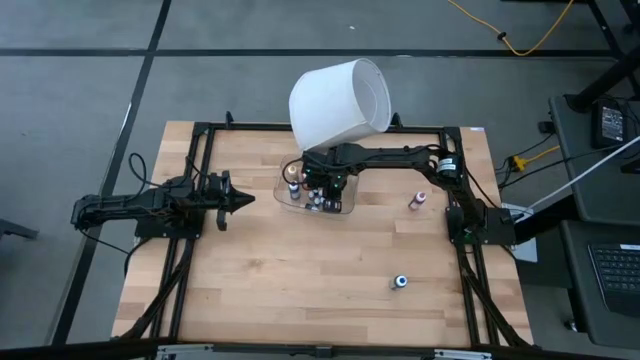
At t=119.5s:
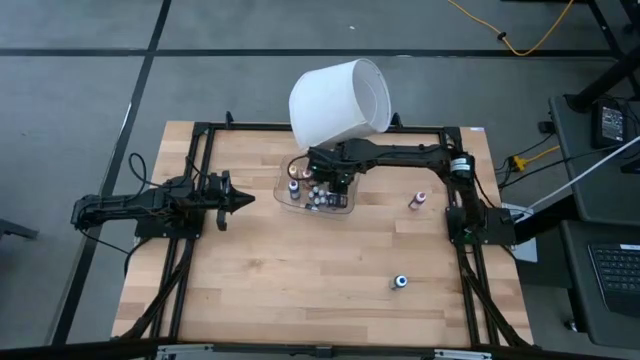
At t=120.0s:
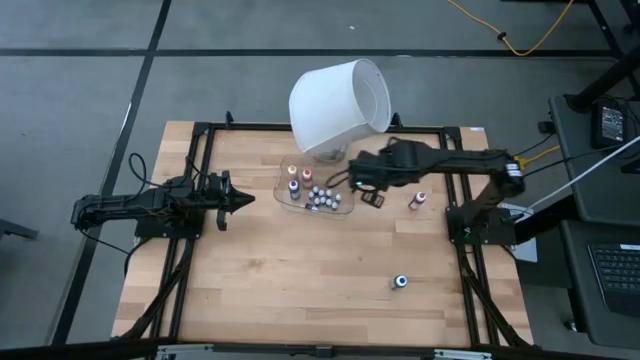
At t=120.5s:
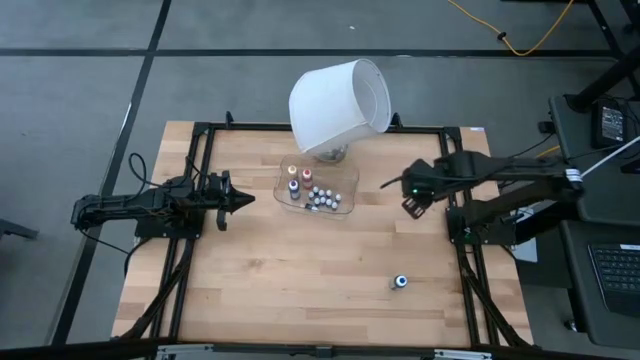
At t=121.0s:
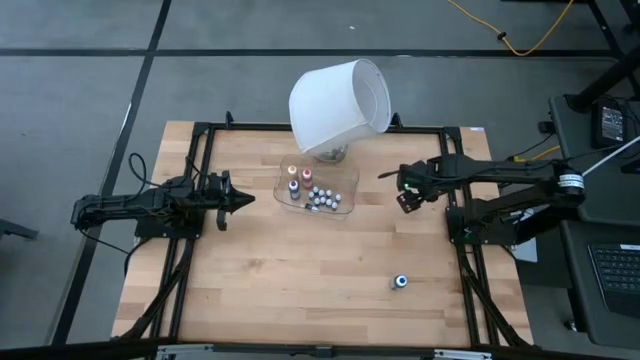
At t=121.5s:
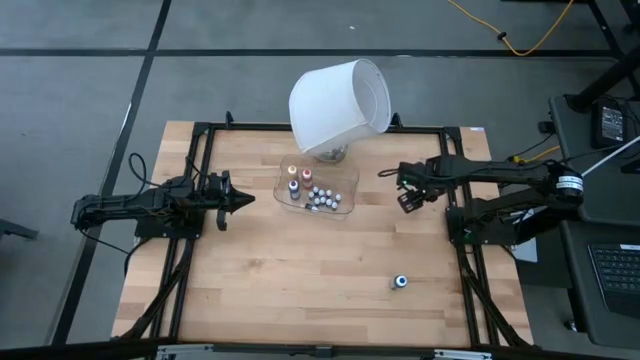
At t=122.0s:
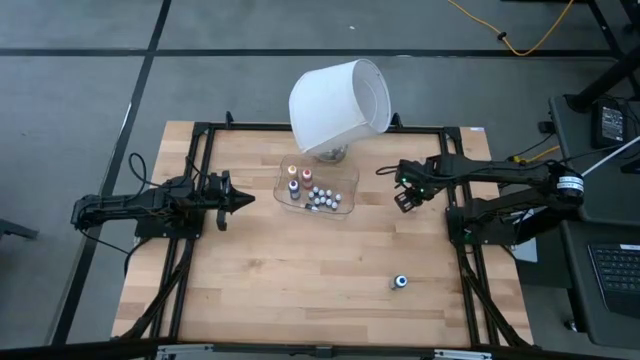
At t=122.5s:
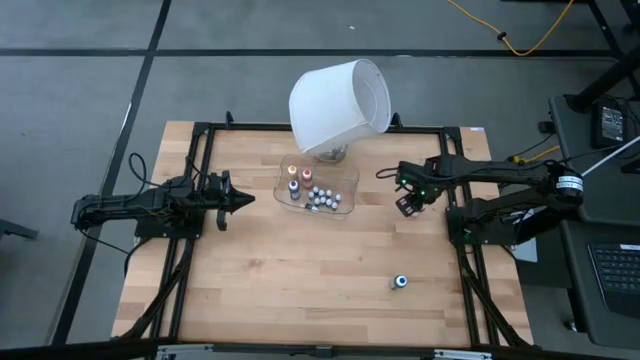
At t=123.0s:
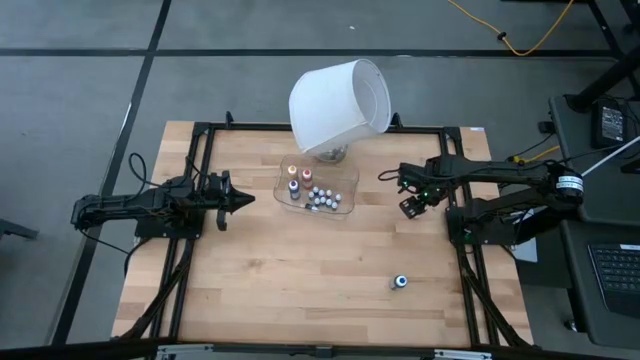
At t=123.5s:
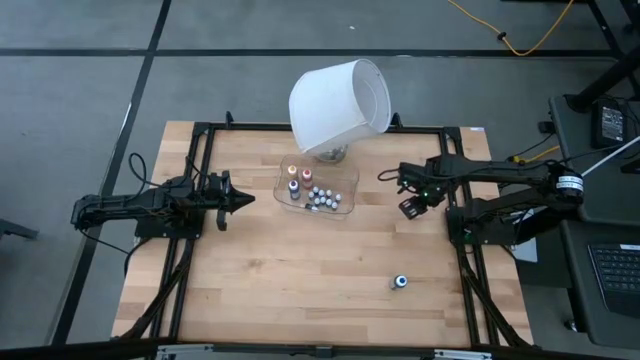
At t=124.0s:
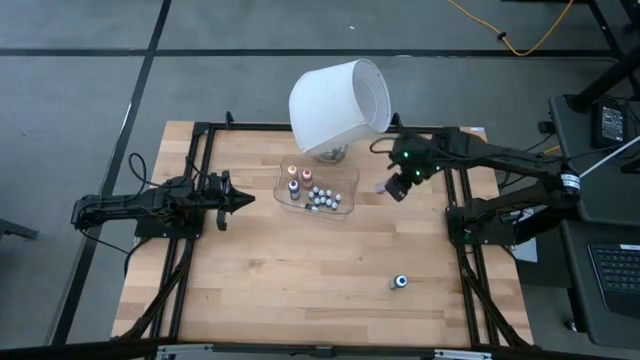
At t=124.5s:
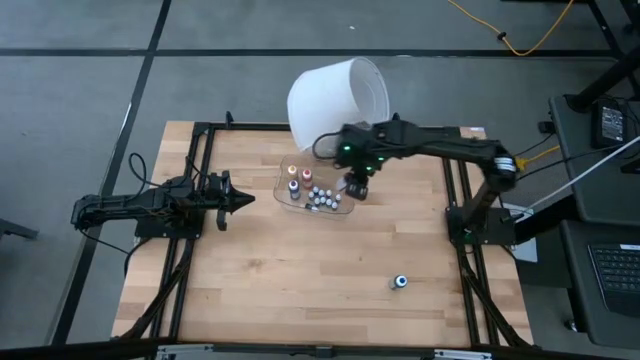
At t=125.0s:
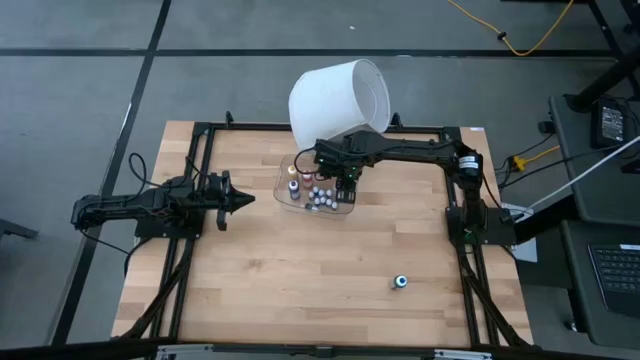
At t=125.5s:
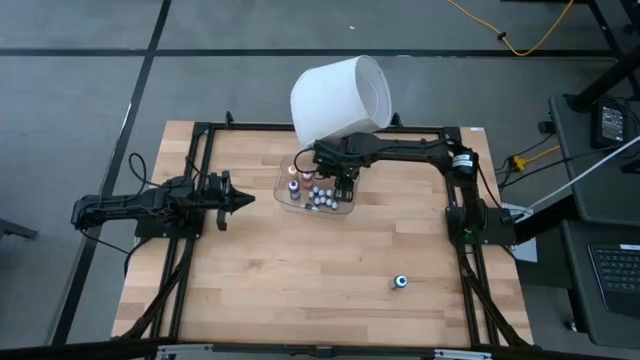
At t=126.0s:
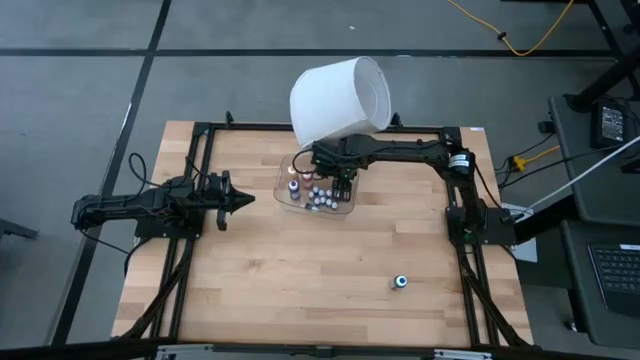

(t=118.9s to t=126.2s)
Task: Pick & Place food coloring
Put the big pink food coloring bottle into the container

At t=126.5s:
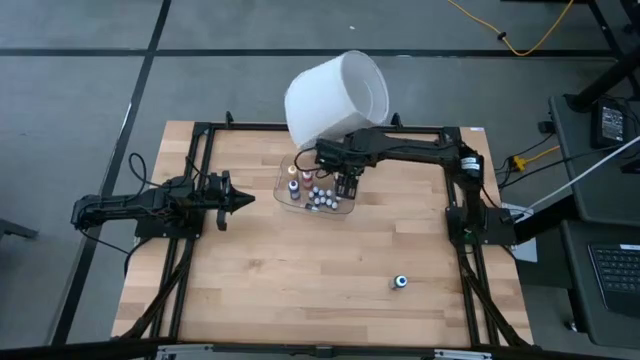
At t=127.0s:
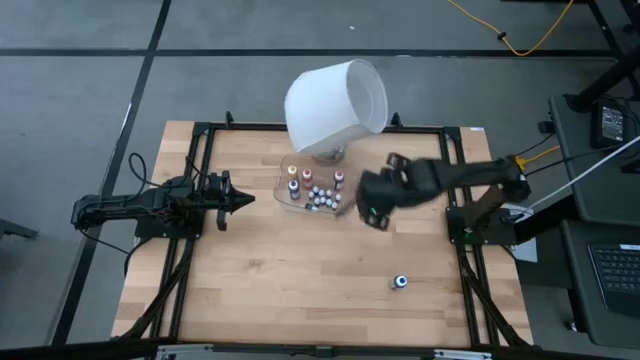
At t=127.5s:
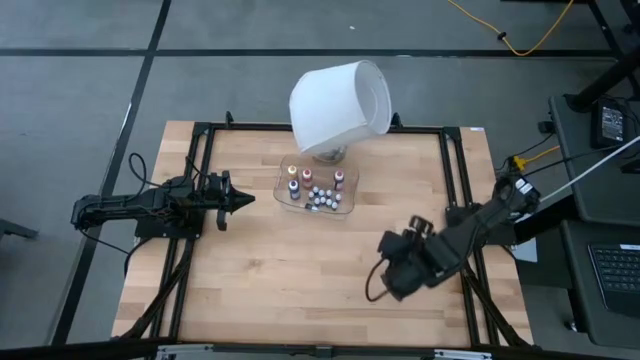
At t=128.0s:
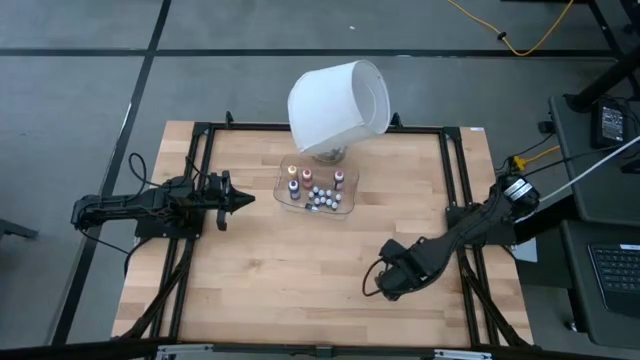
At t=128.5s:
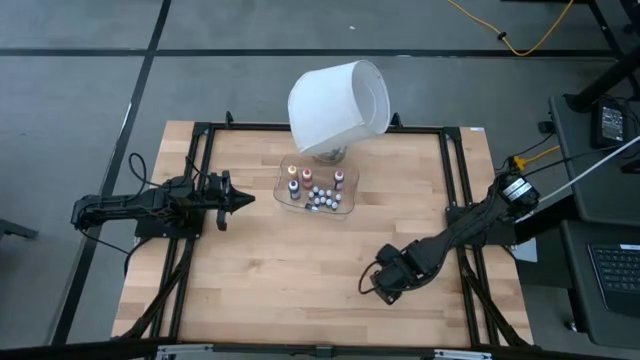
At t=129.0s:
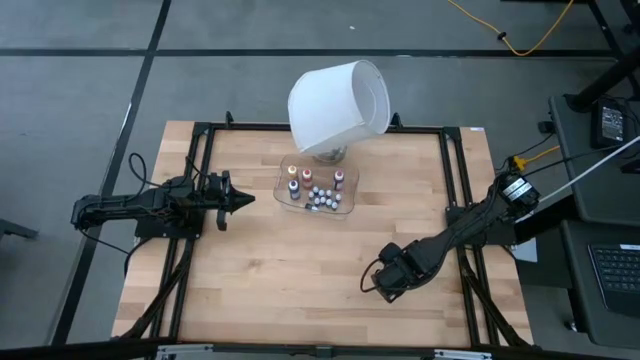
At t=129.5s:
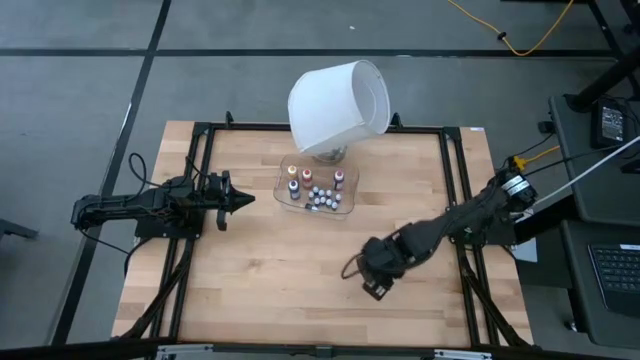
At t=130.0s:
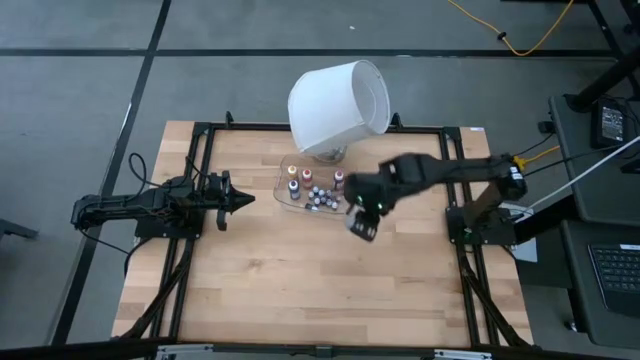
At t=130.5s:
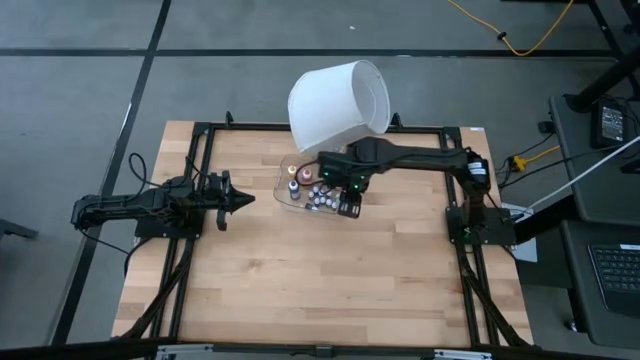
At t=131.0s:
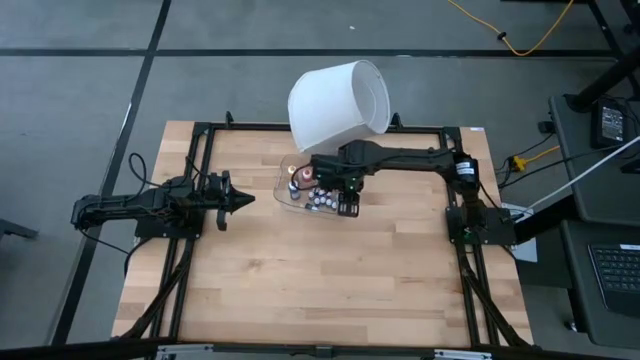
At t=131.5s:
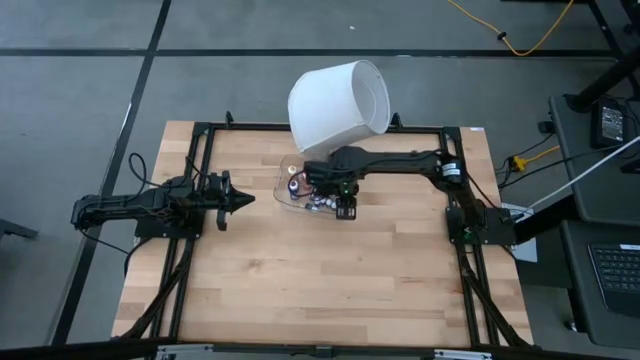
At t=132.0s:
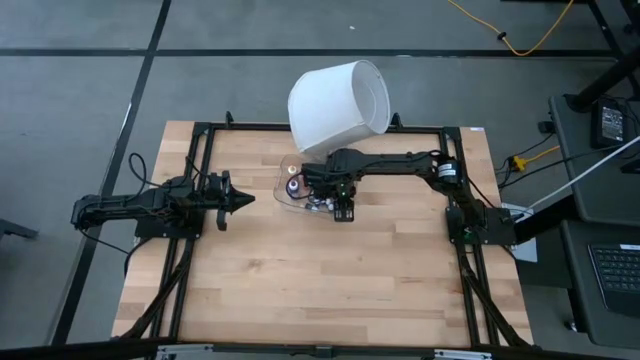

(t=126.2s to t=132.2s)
Put the big blue food coloring bottle into the container

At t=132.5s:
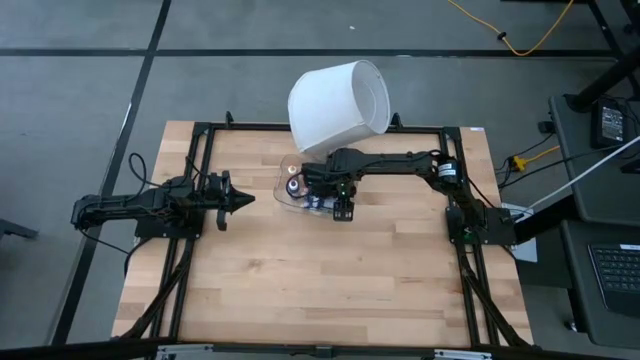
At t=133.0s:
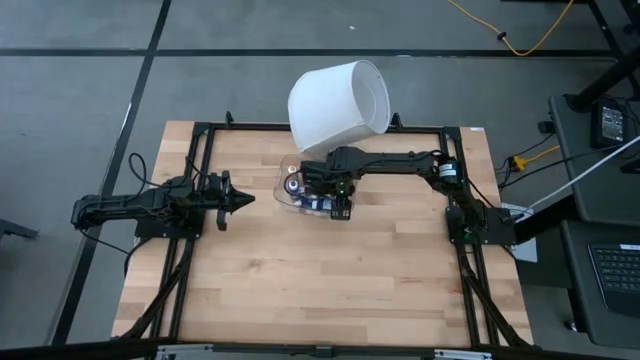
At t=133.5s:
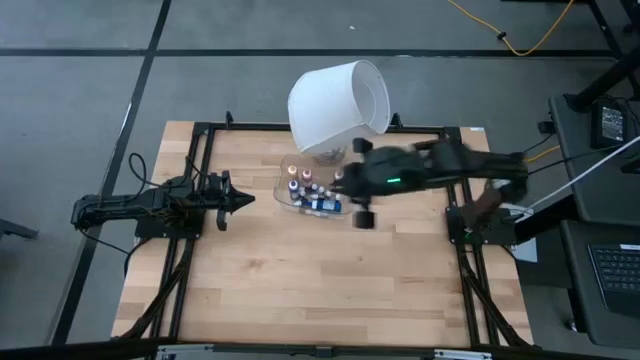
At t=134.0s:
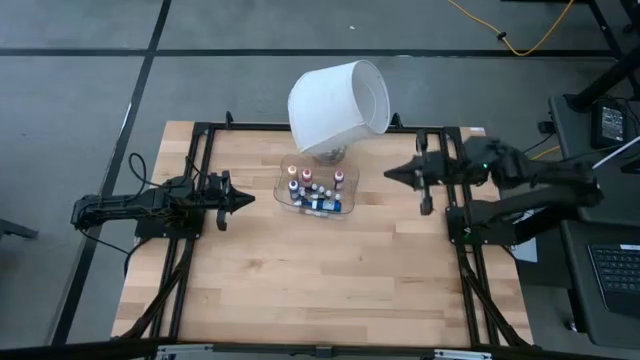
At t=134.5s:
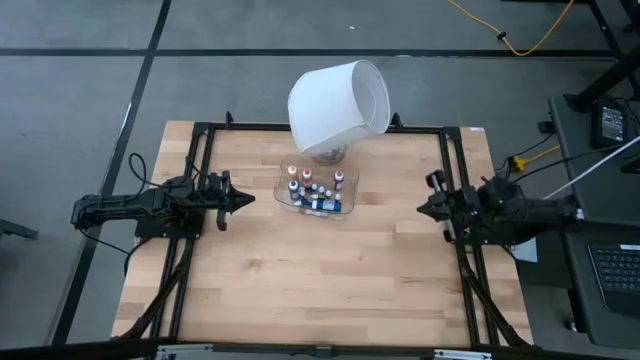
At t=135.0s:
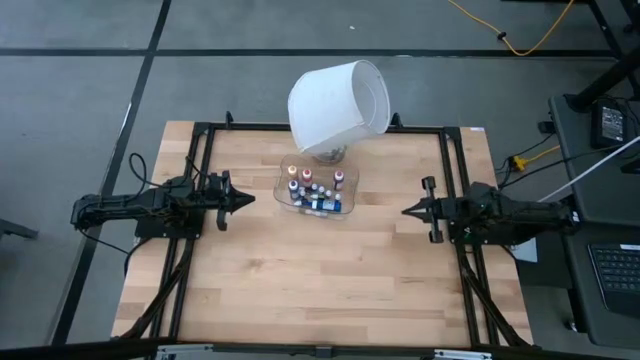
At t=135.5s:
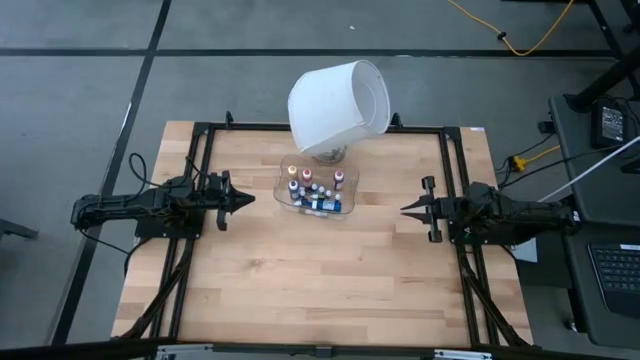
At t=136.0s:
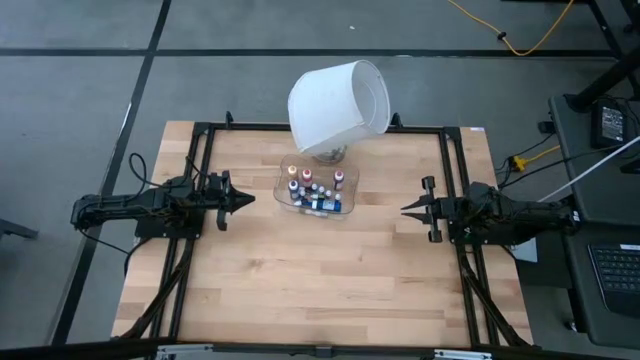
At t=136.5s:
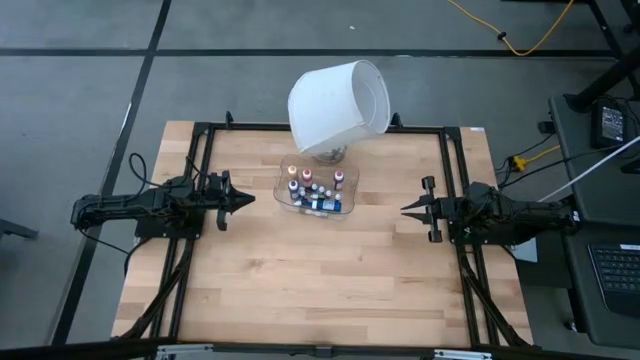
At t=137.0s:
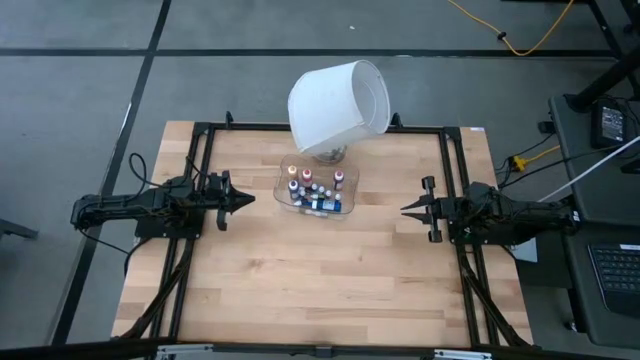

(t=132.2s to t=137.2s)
Return to Home Position
